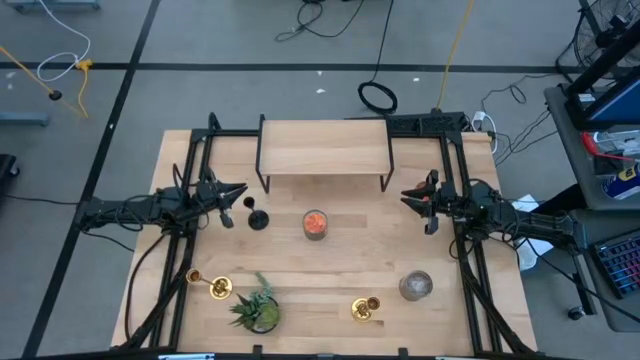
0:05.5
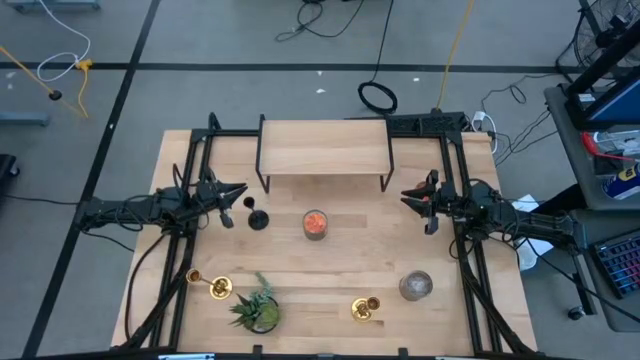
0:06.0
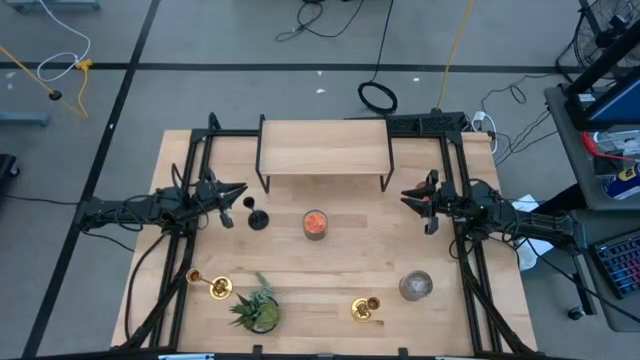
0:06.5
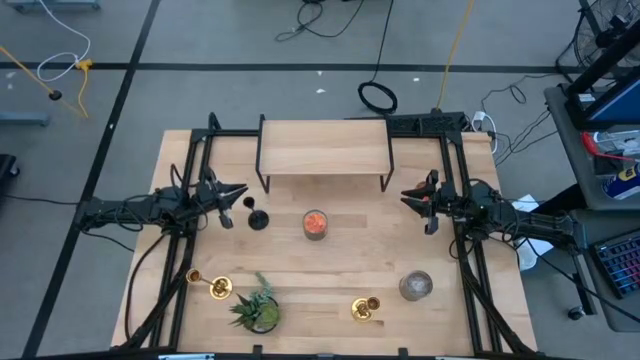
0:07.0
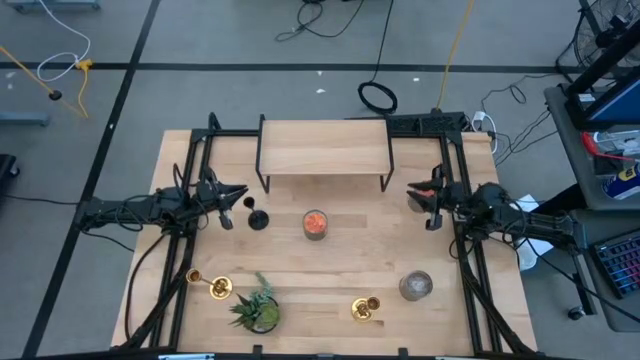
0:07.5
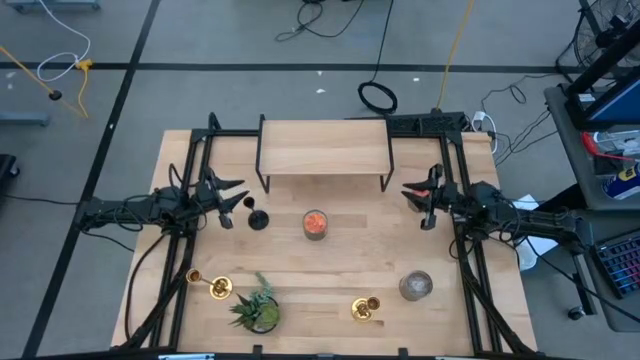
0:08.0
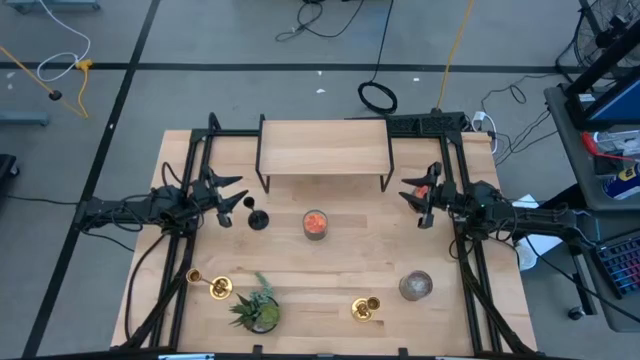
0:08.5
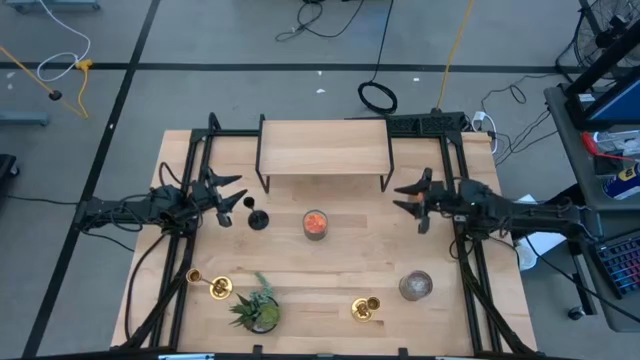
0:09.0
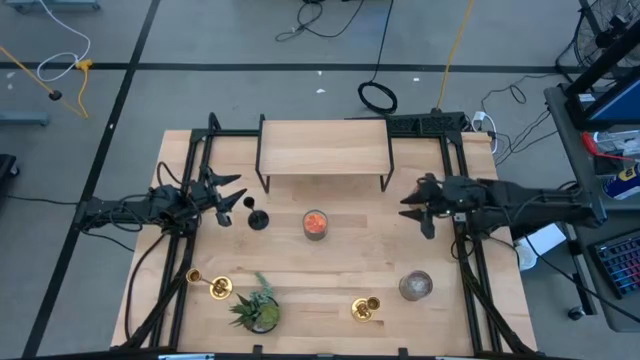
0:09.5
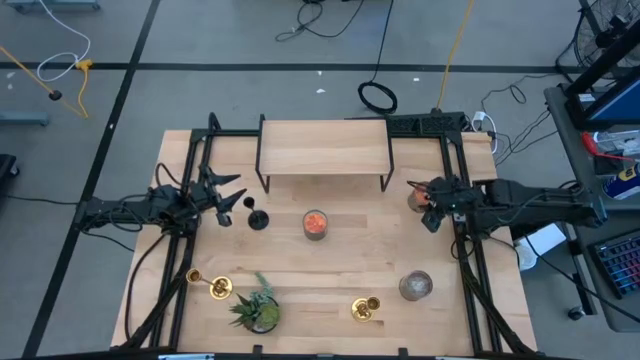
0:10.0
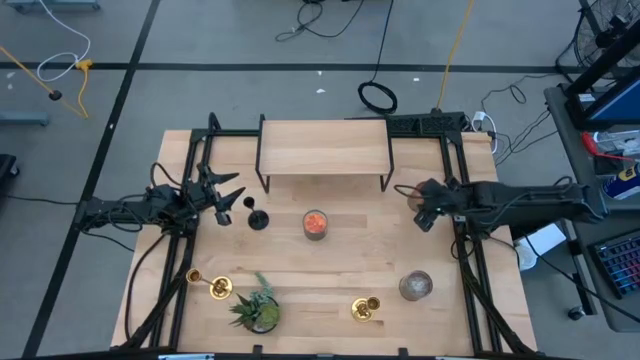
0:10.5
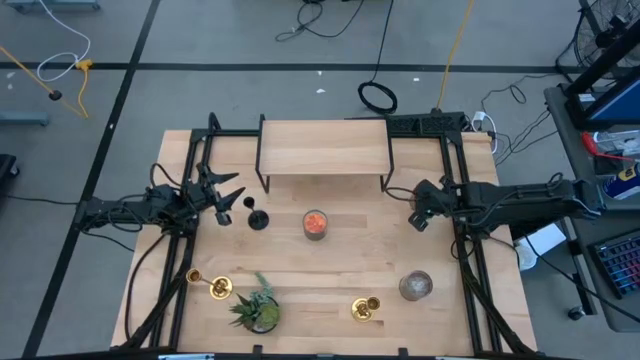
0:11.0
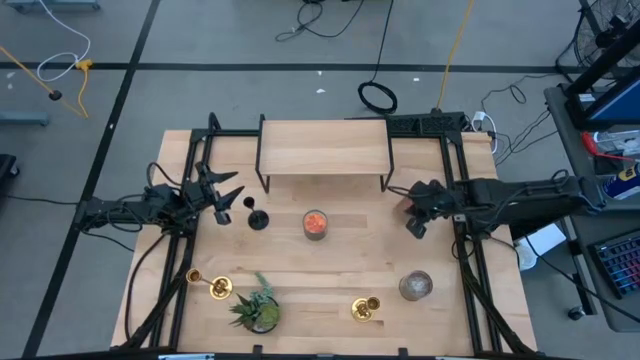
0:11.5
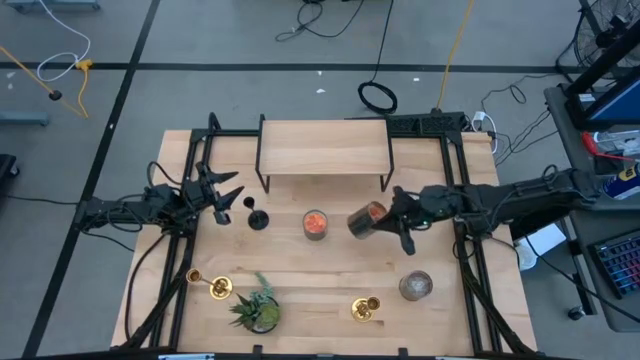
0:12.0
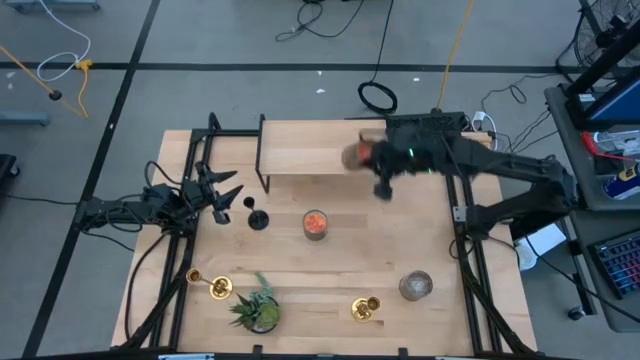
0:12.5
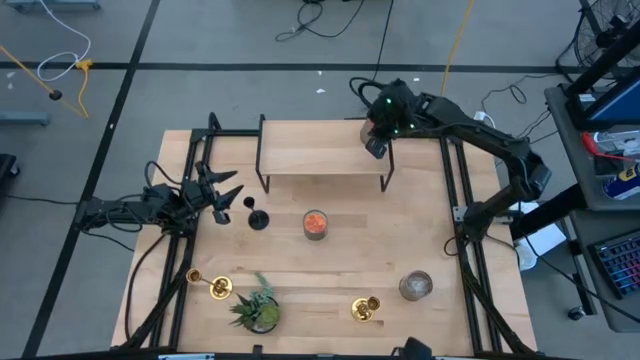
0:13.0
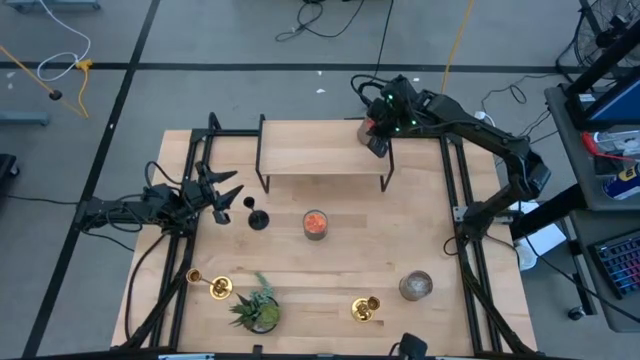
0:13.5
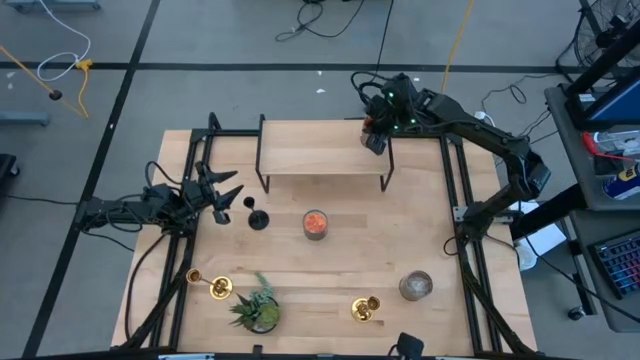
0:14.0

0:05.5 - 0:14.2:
Task: Pick & Place candle stick holders
Put the right orange scented candle on the shelf

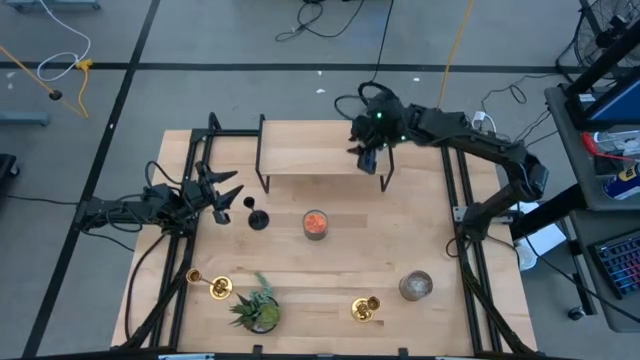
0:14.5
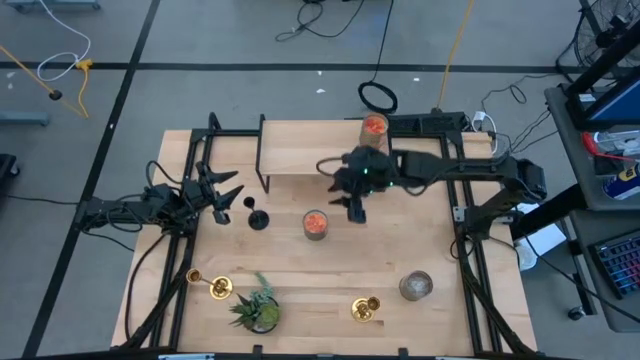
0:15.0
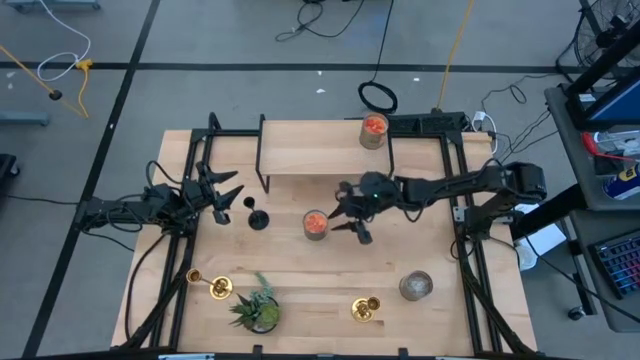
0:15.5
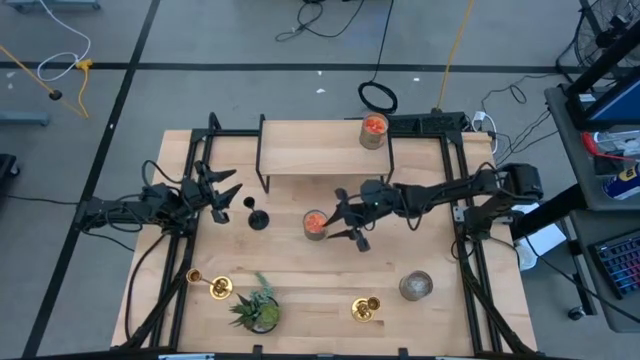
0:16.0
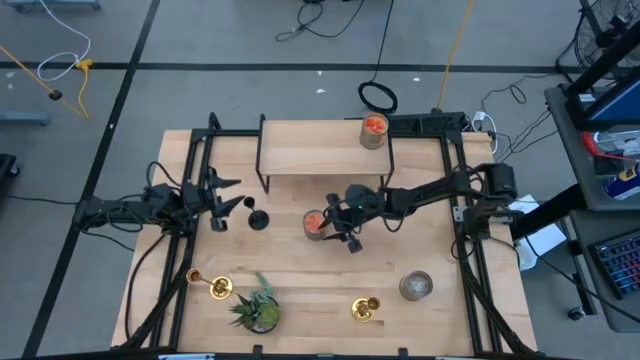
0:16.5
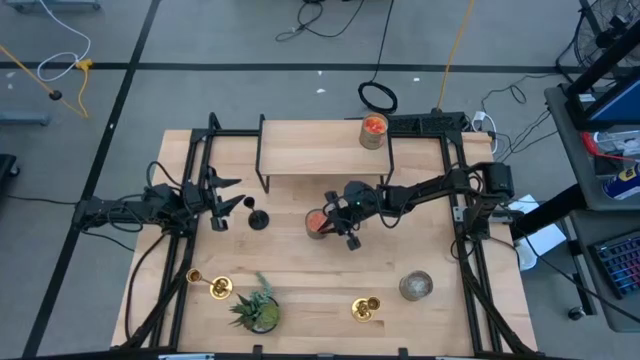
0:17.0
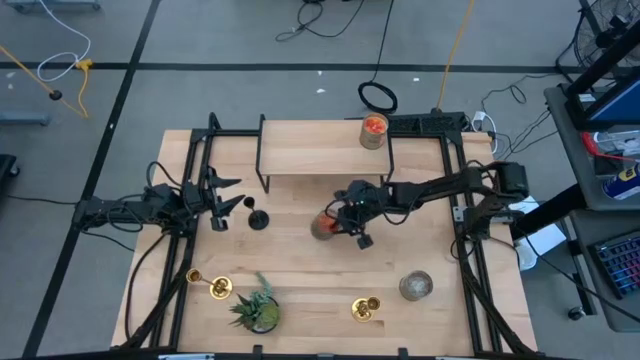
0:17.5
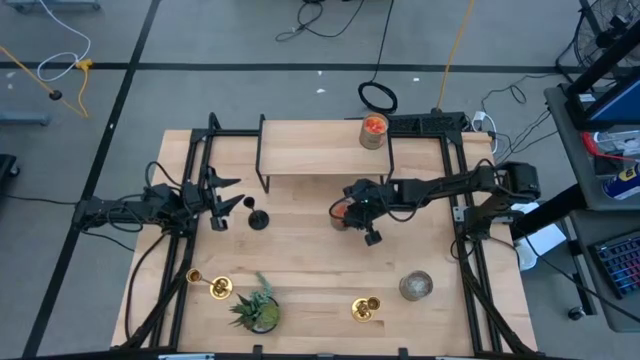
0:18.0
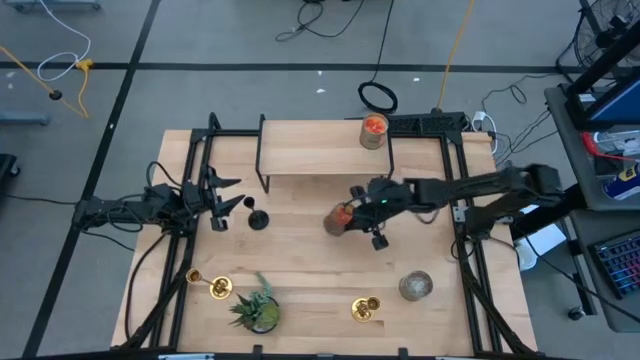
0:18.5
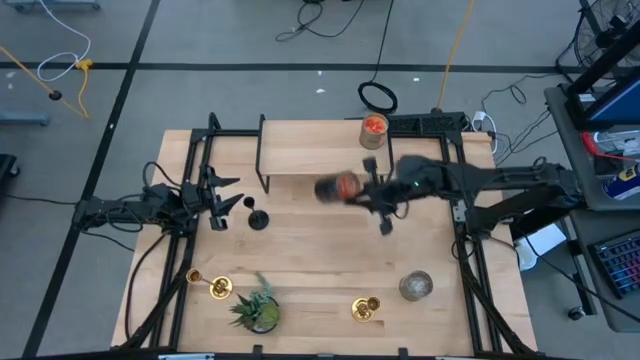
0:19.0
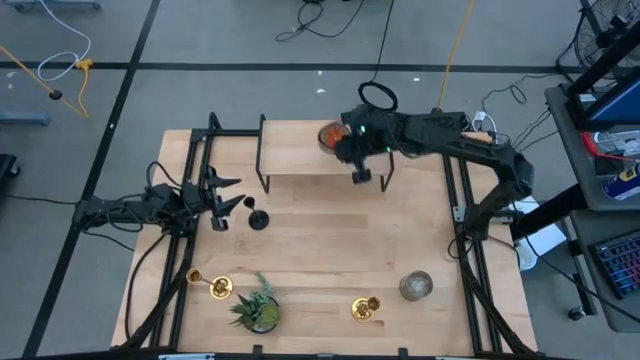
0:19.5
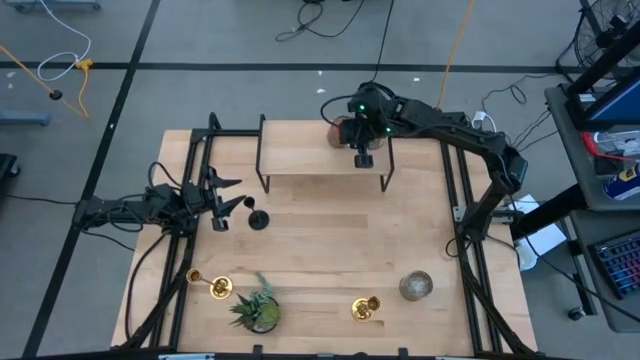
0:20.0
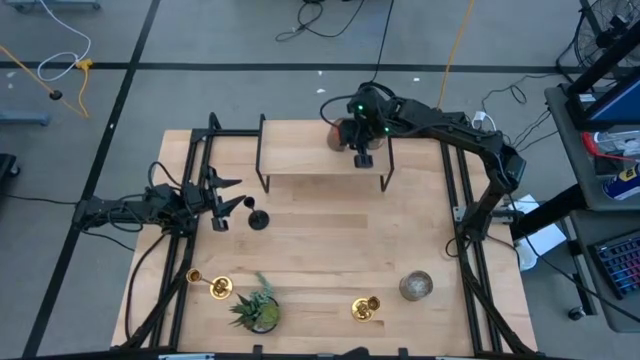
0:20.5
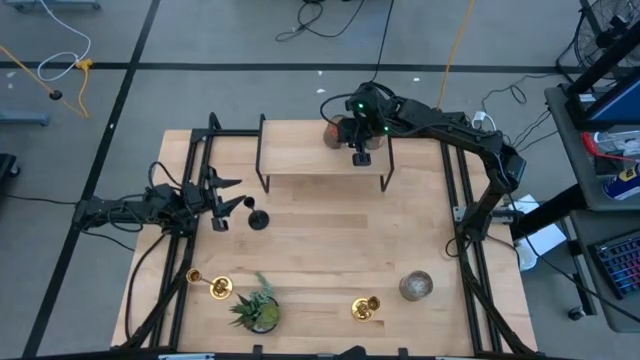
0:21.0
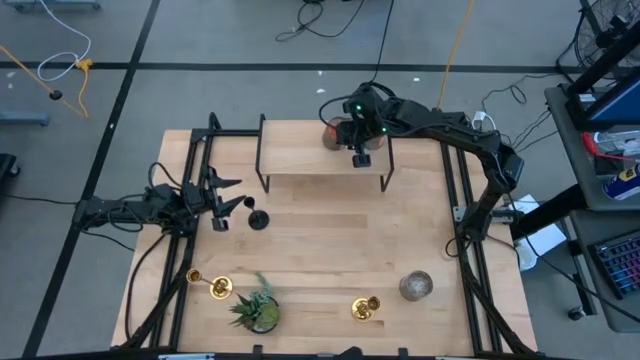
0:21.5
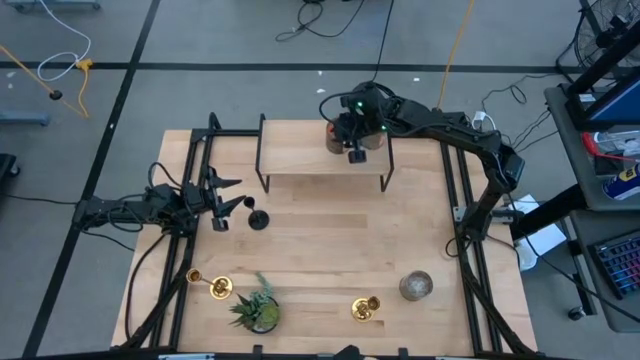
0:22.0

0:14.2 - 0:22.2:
Put the orange scented candle on the shelf

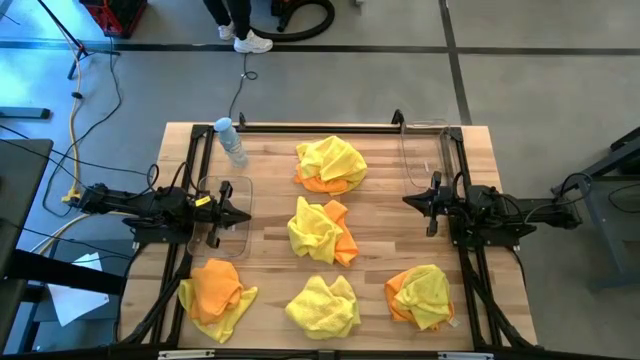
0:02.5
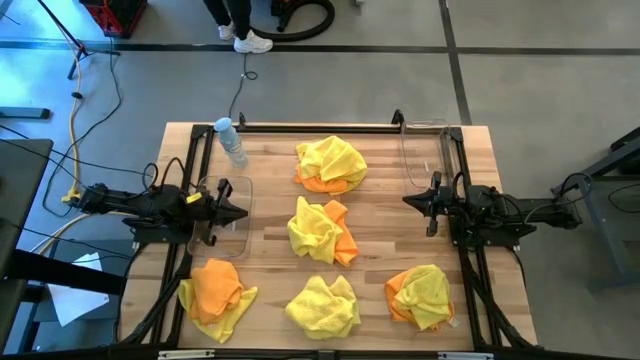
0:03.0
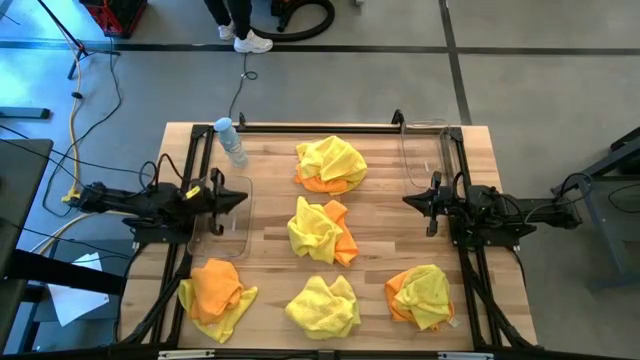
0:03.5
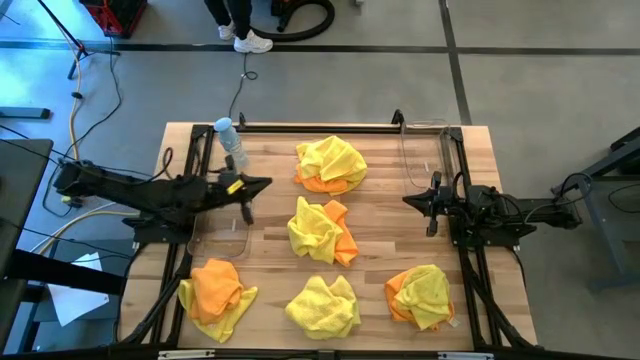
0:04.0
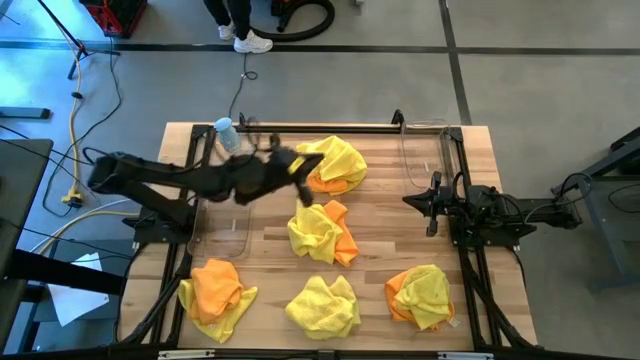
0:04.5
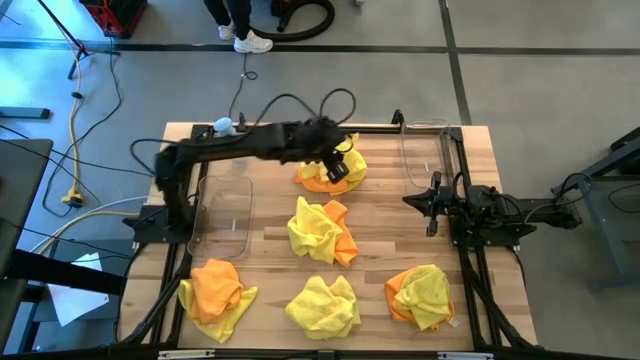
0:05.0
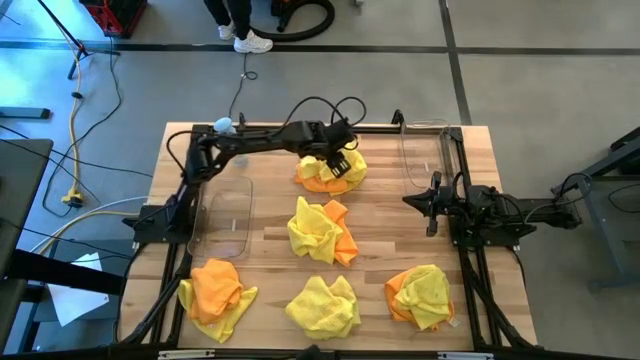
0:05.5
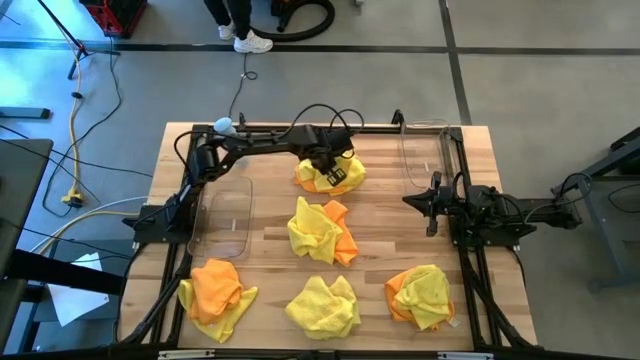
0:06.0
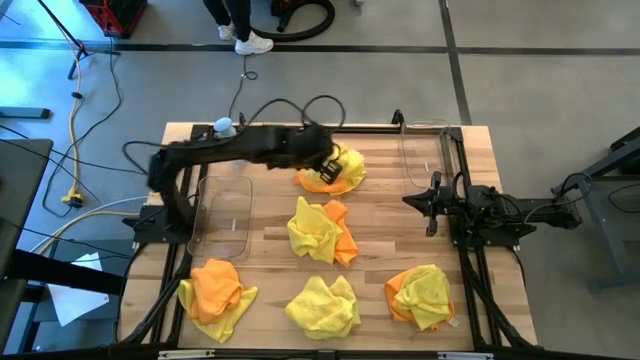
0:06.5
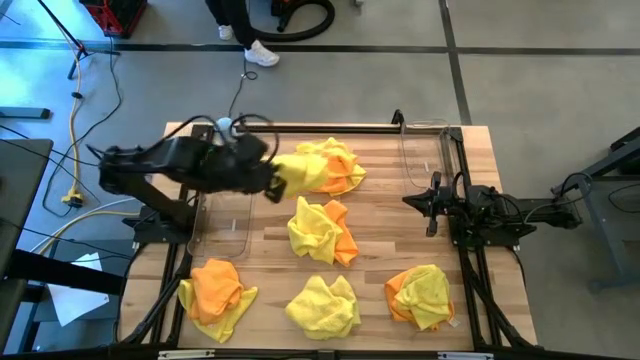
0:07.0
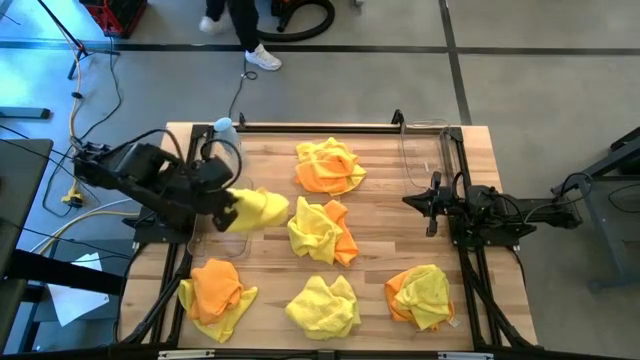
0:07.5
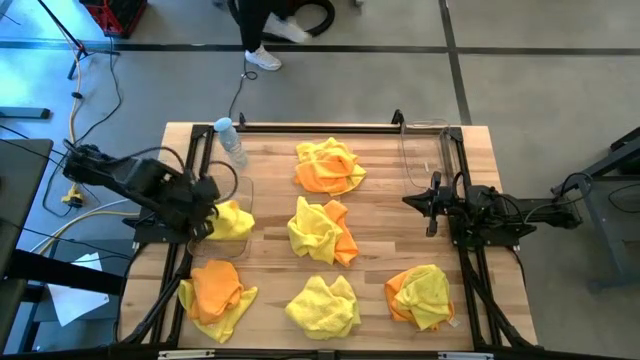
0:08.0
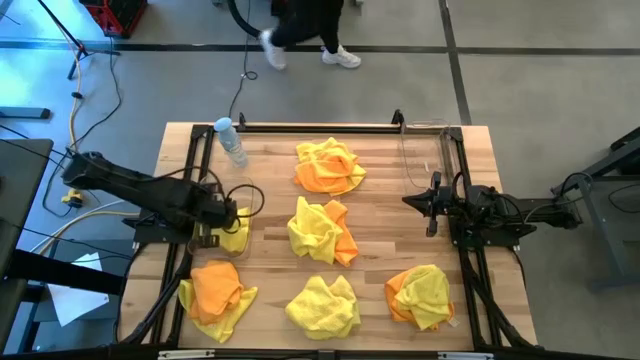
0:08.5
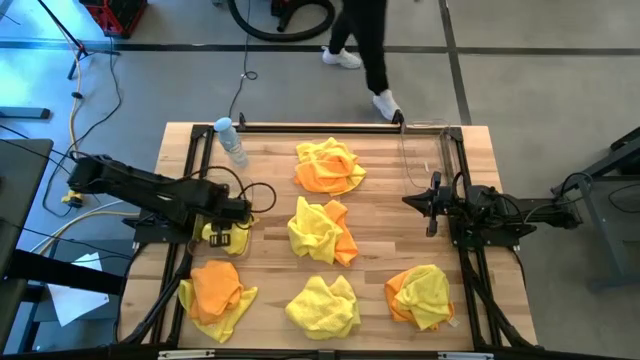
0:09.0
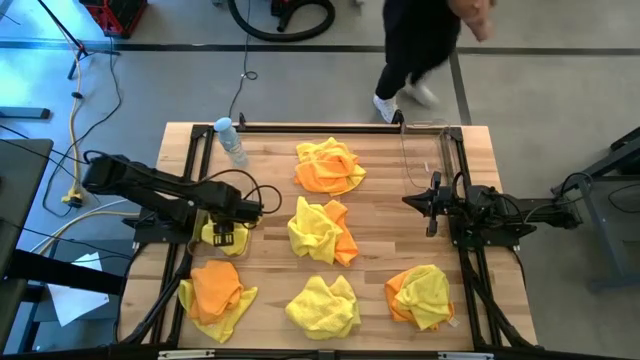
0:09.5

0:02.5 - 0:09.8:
Task: Sort microfiber towel by color & place in baskets
Put the yellow microfiber cloth into the left transparent bin
